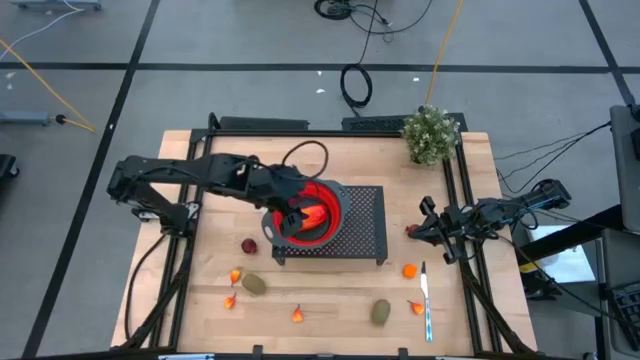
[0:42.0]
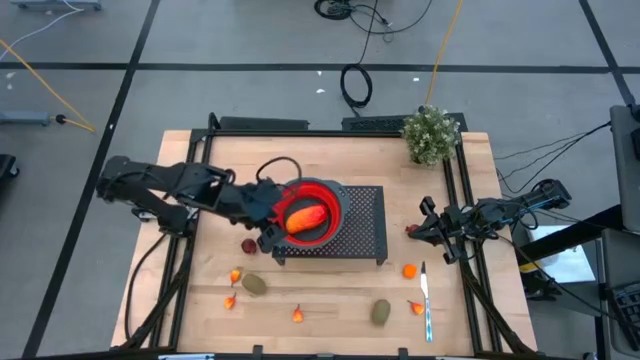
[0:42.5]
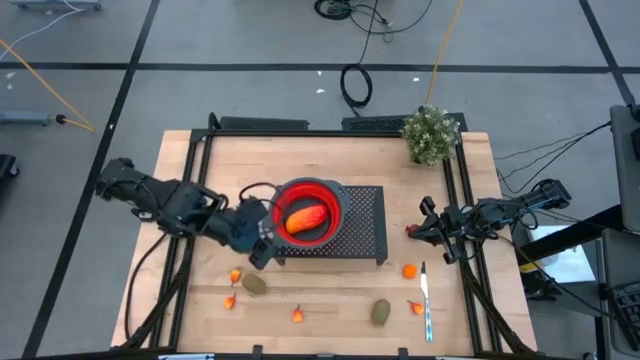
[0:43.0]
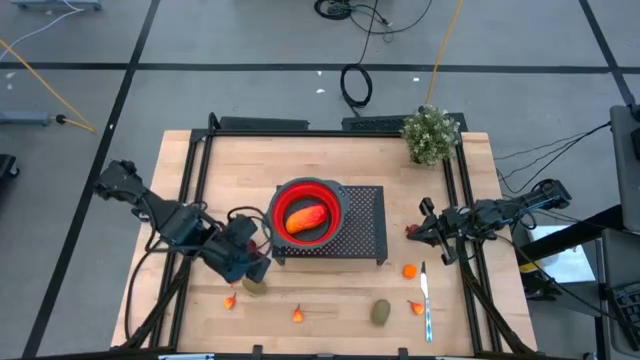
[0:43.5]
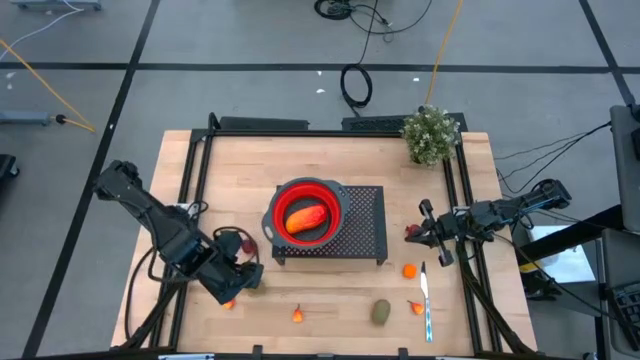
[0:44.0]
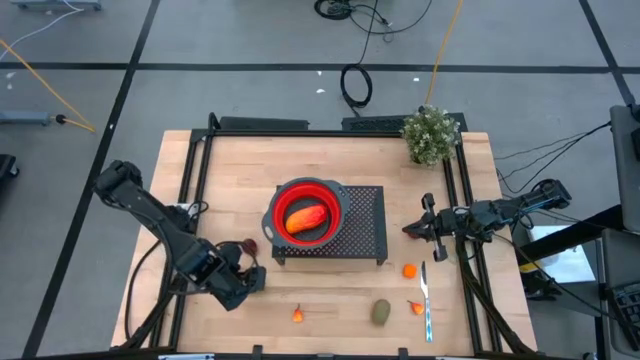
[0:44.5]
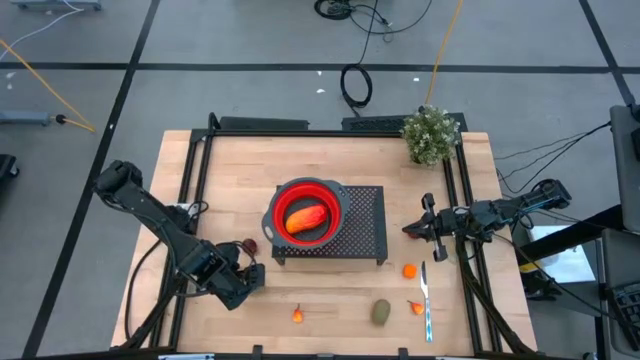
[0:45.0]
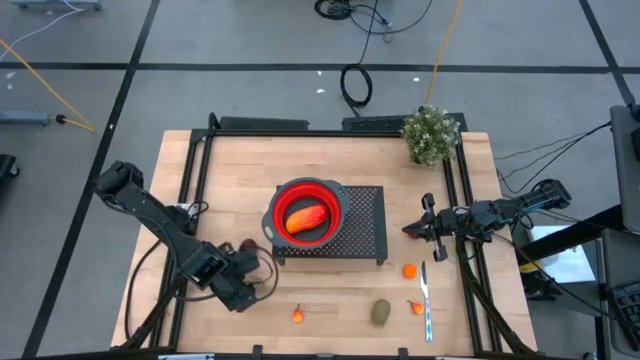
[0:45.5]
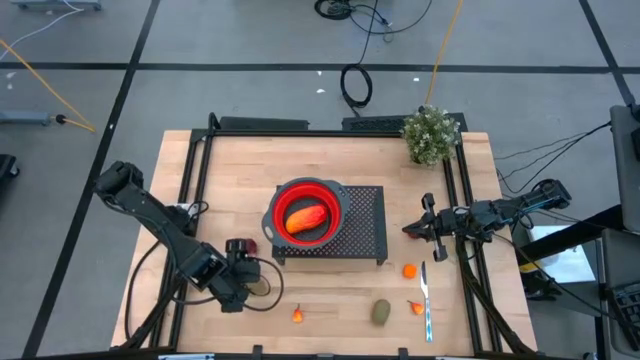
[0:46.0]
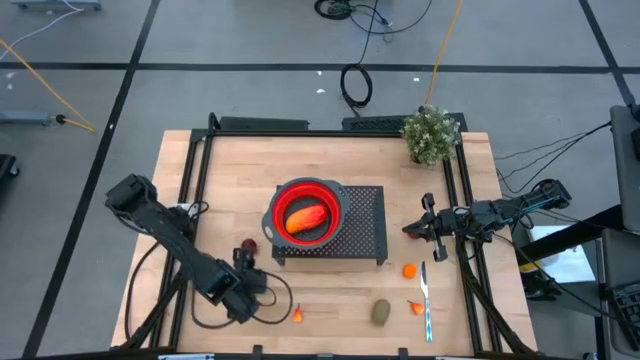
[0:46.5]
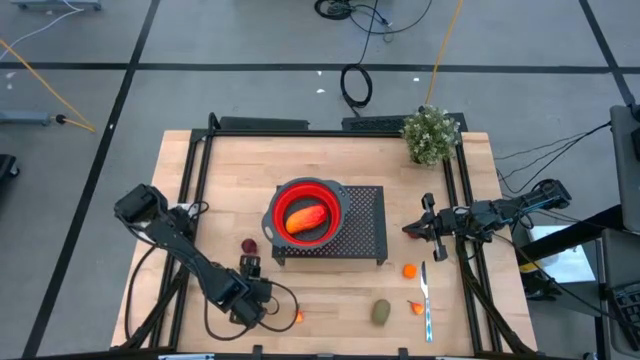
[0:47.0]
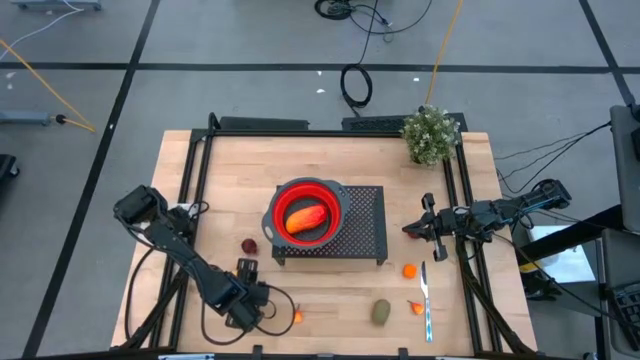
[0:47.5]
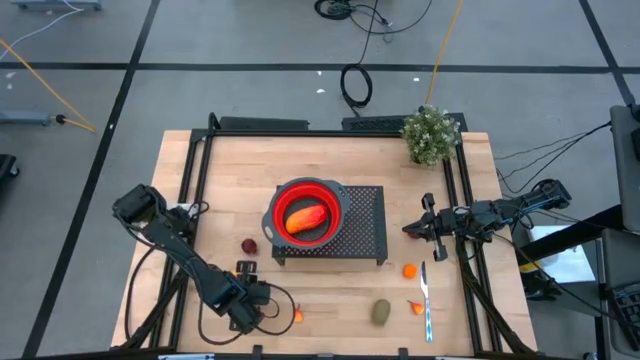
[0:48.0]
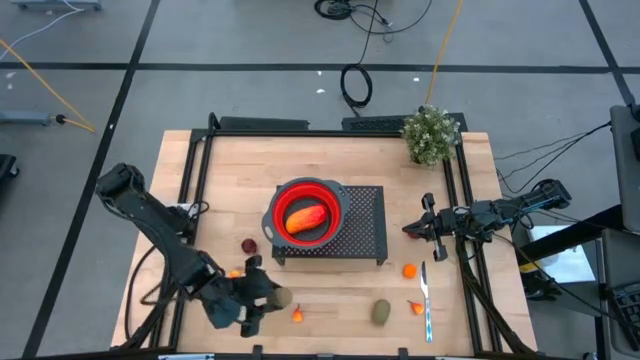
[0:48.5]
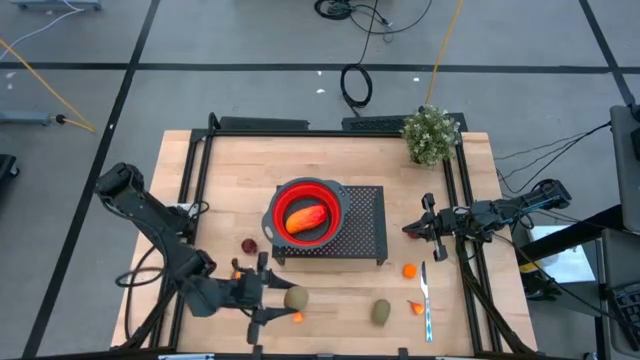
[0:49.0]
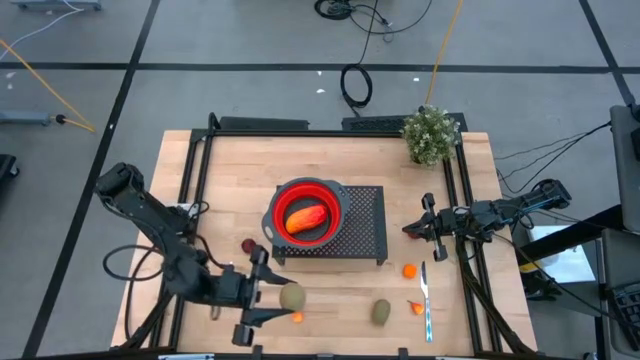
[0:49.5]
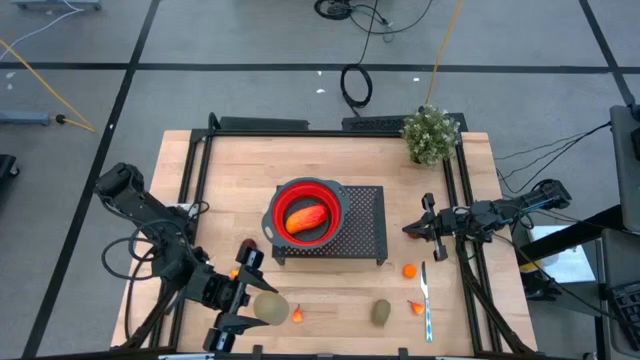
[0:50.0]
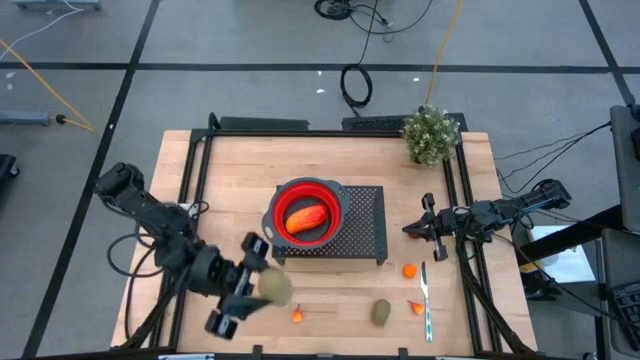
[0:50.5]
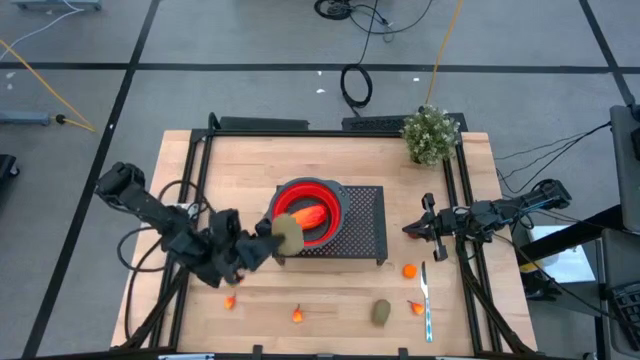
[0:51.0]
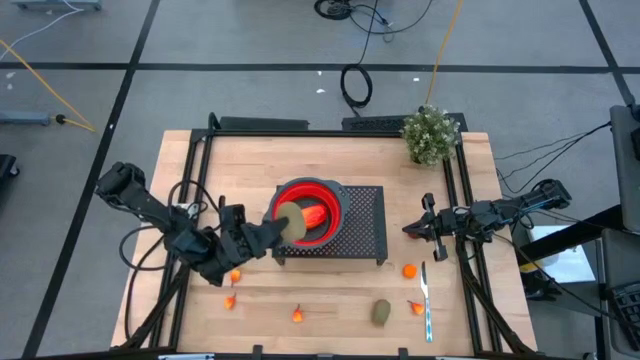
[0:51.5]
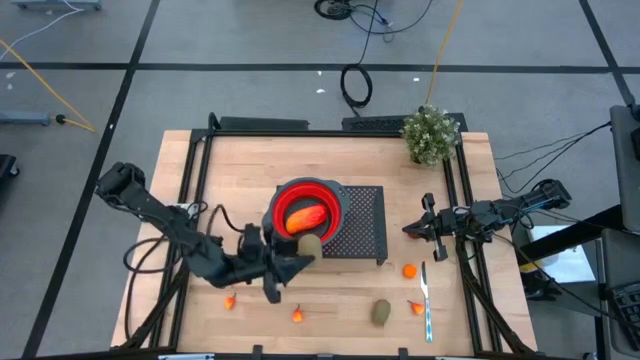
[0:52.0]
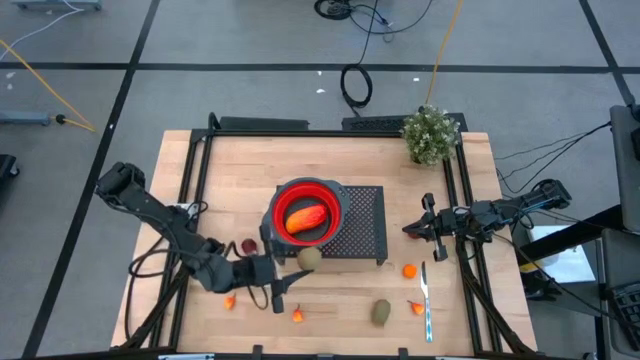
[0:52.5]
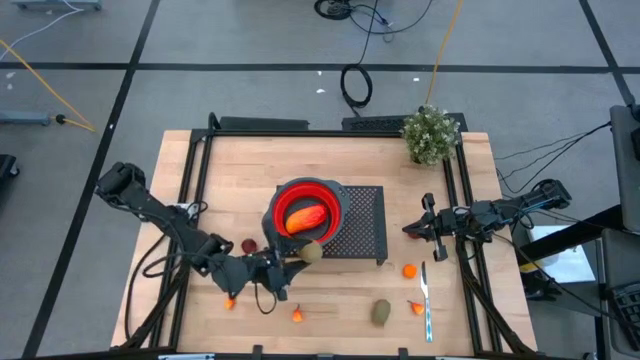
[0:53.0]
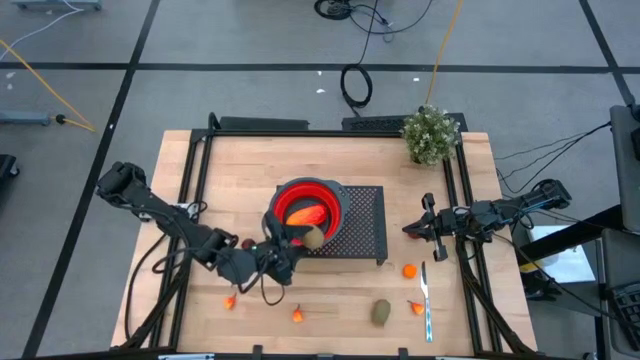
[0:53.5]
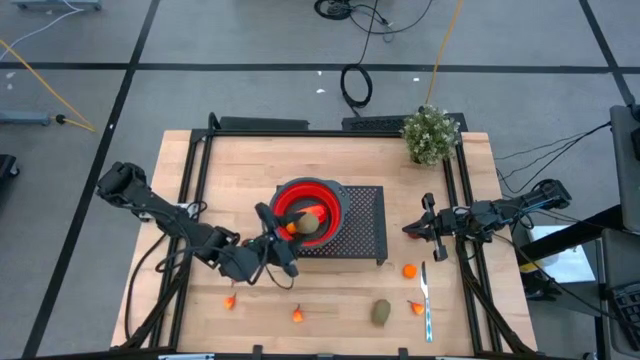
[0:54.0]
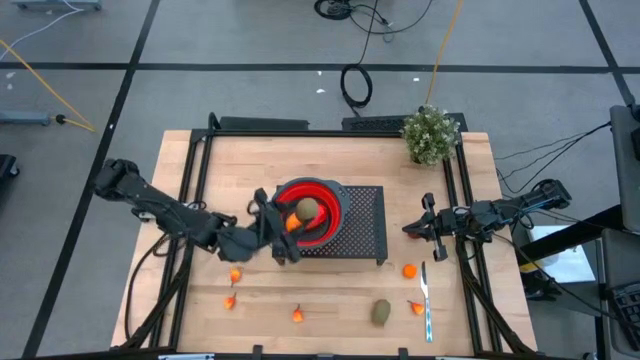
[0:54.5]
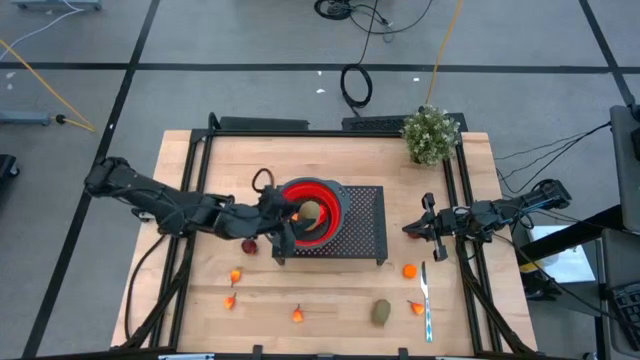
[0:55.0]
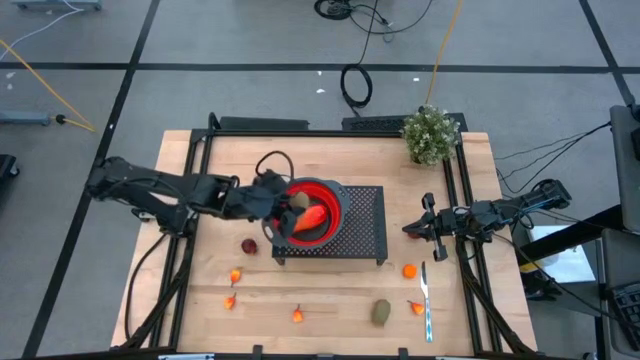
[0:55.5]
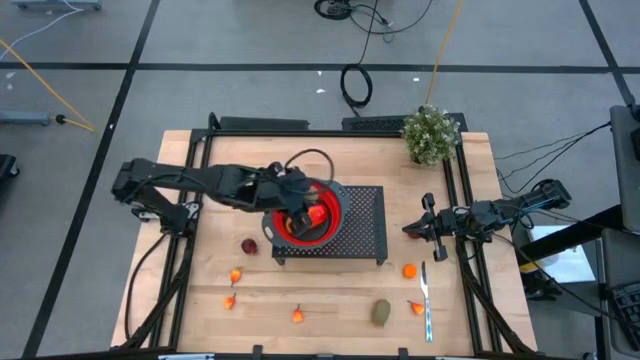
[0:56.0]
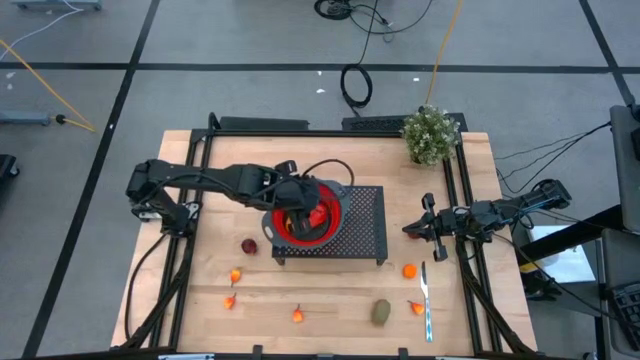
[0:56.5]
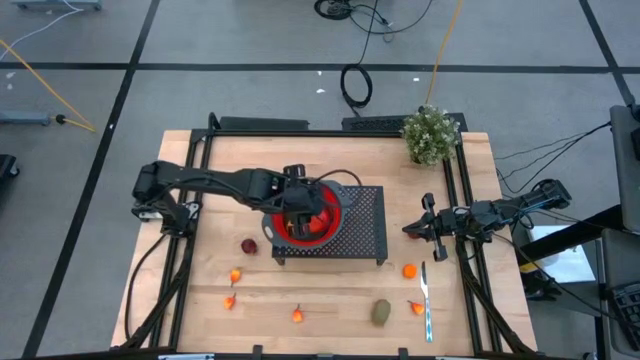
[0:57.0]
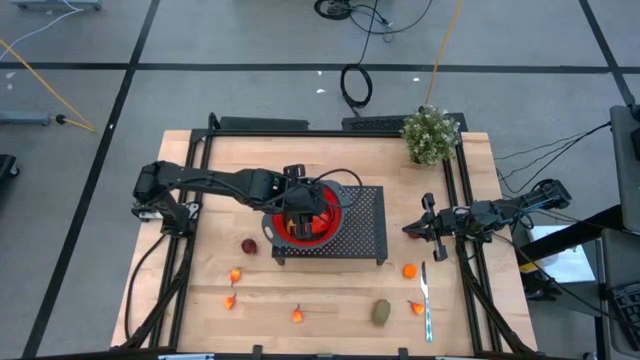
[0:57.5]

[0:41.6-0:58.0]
Task: Pick & Place Fruit
Put the brown kiwi into the red strainer bowl on the shelf

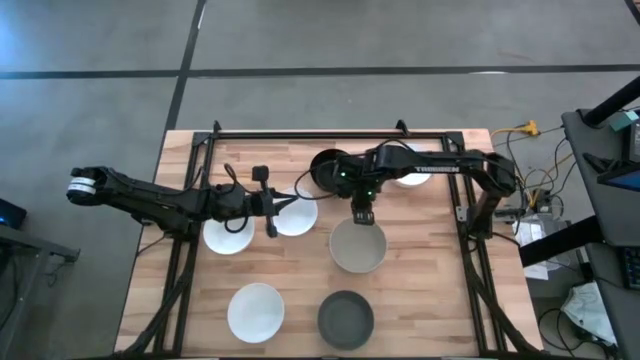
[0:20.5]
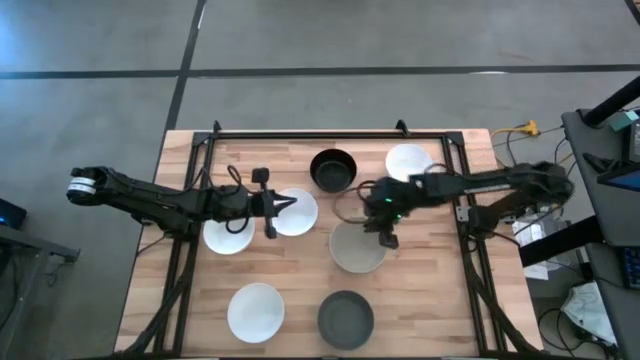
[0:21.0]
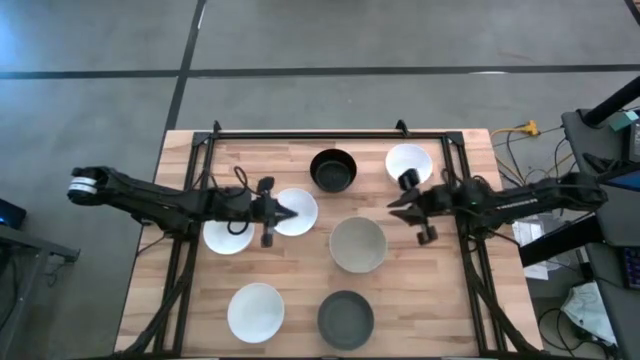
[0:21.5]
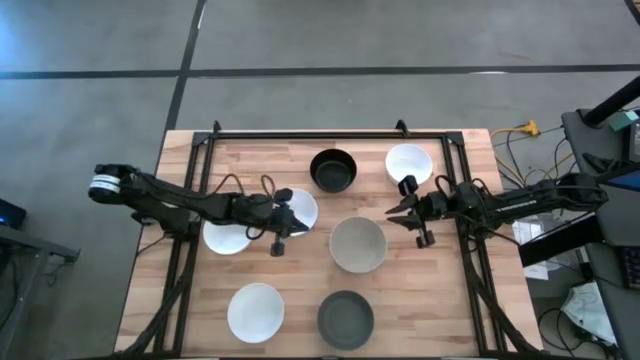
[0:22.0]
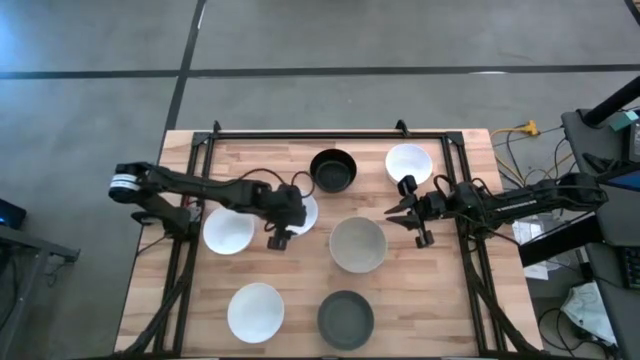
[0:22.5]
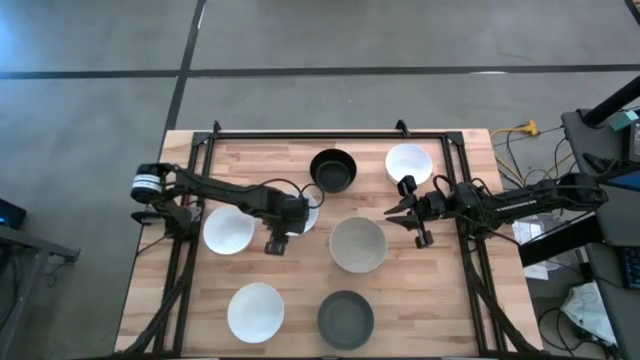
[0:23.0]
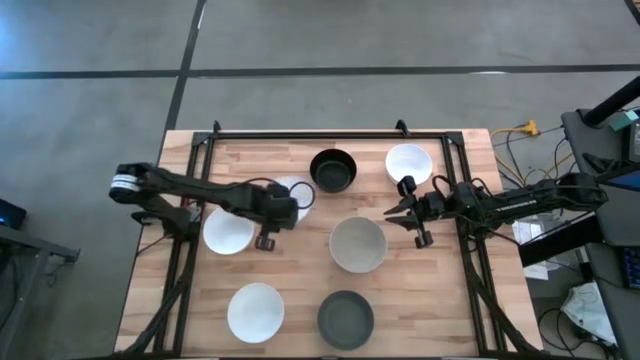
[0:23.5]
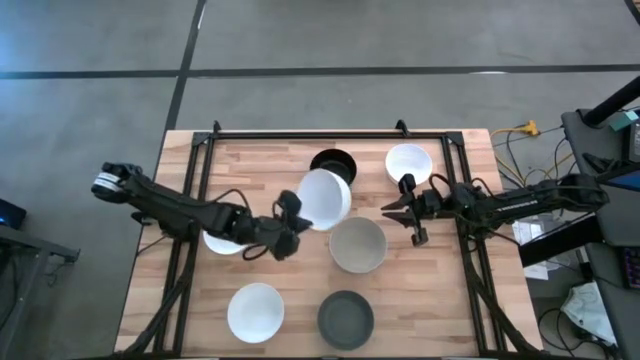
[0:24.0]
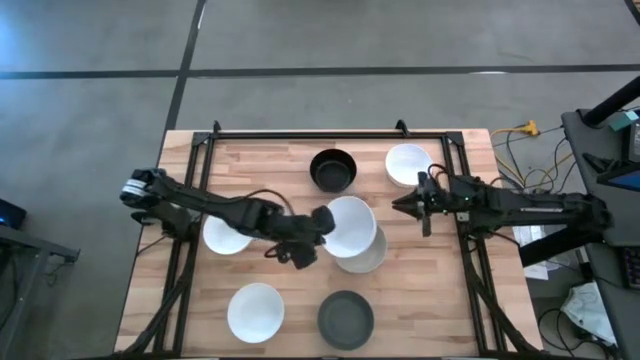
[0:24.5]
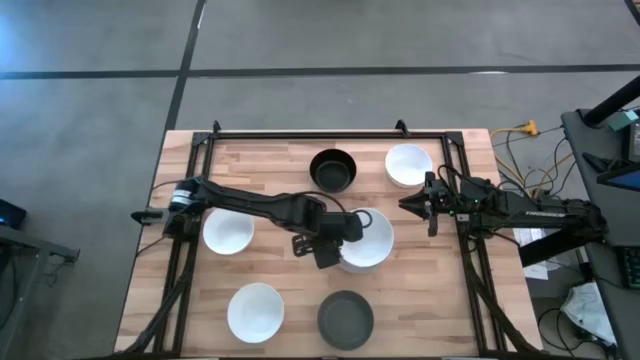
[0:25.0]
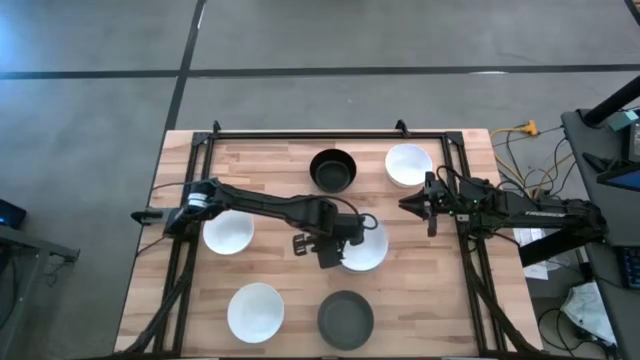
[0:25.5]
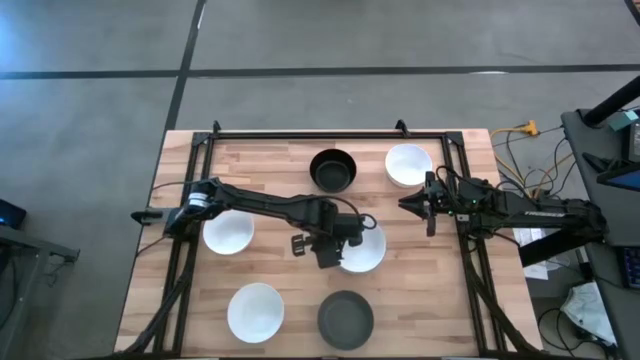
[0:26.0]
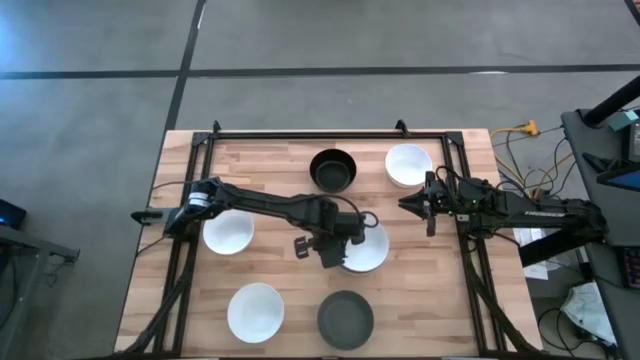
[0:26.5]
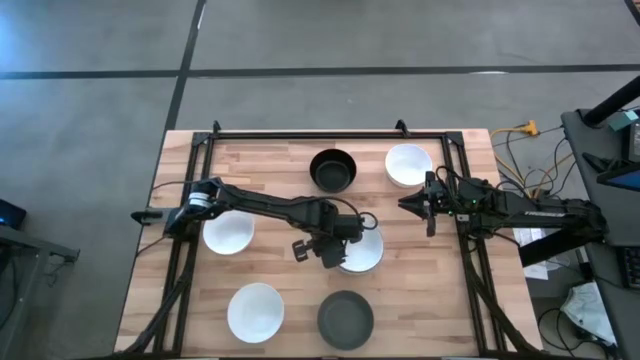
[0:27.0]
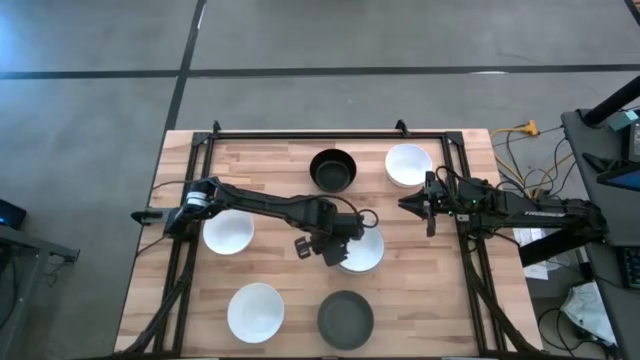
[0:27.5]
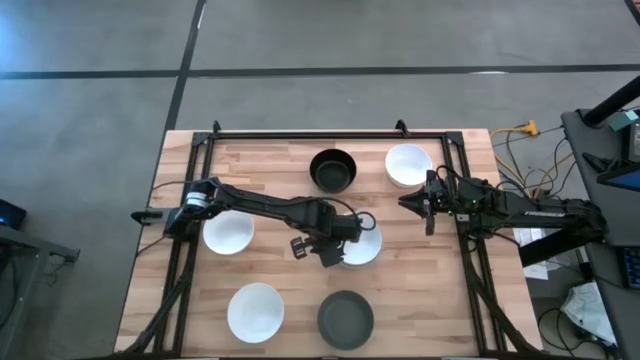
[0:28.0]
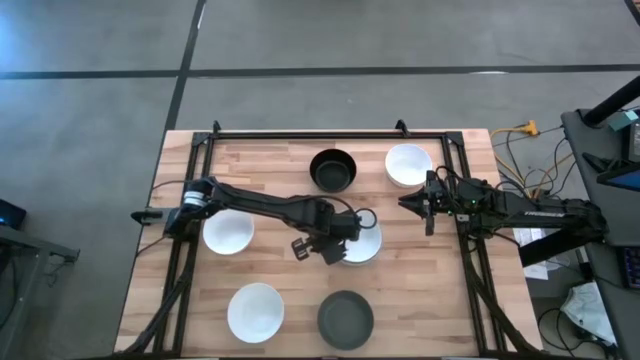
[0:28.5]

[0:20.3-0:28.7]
Task: Nest bowls inside each other
Stack the white bowl on top of the gray bowl
